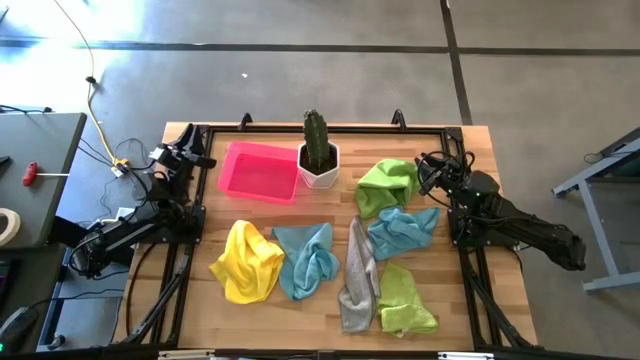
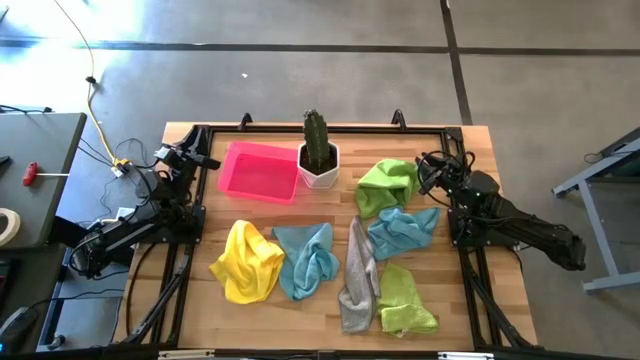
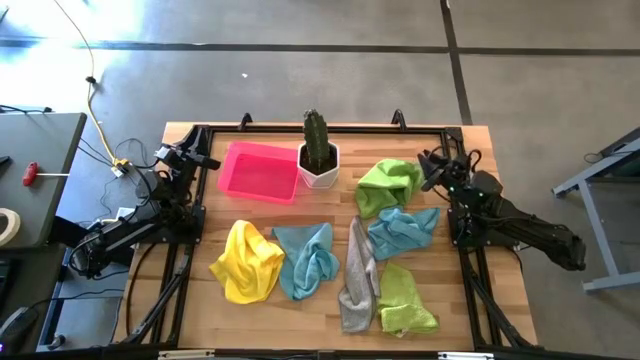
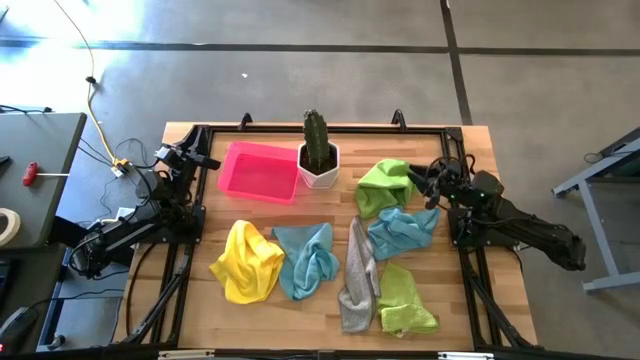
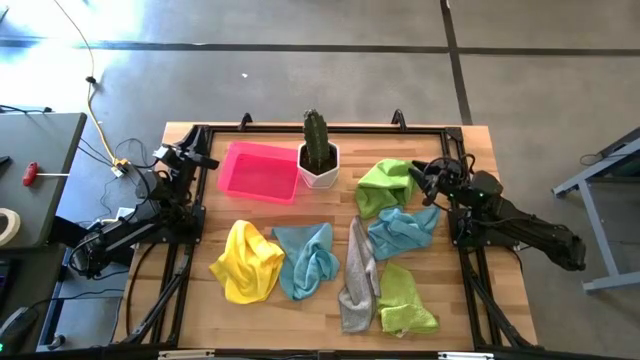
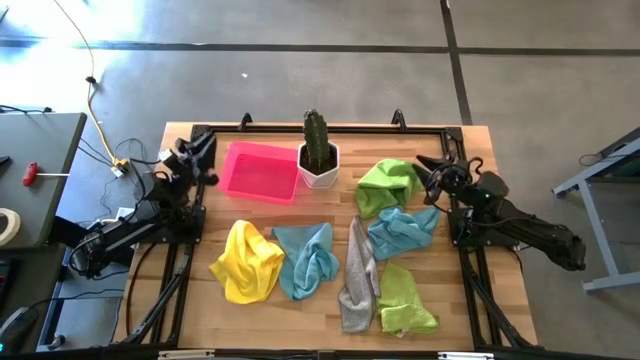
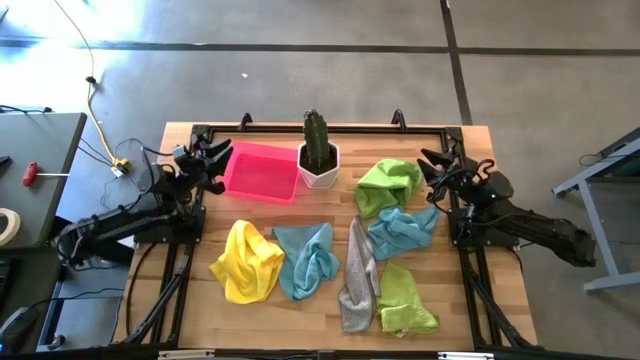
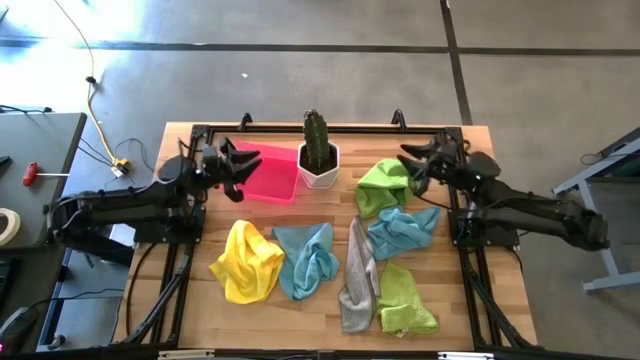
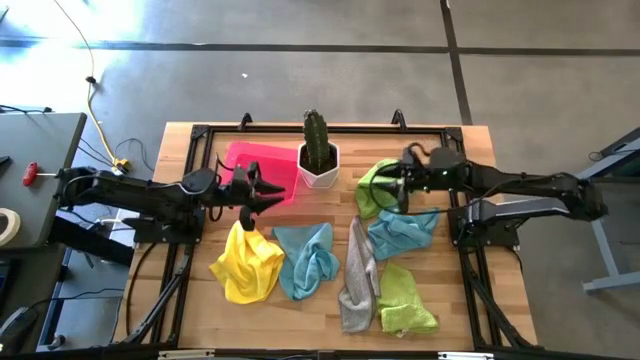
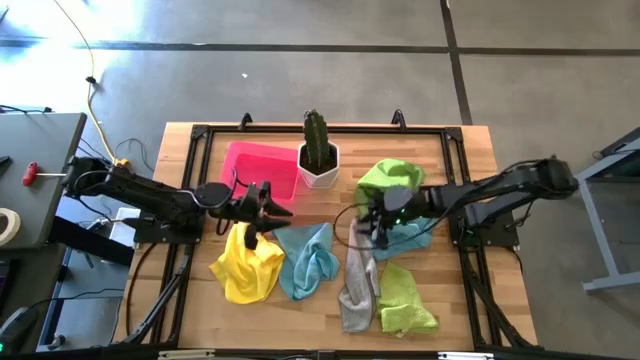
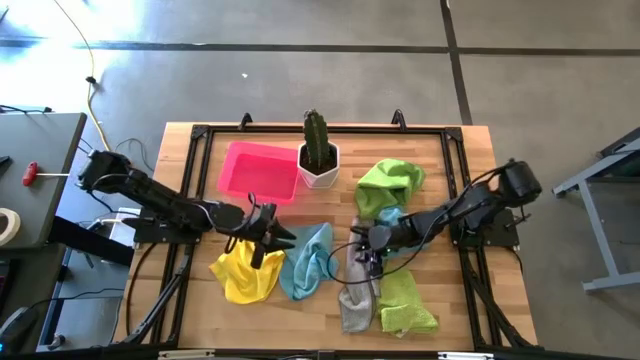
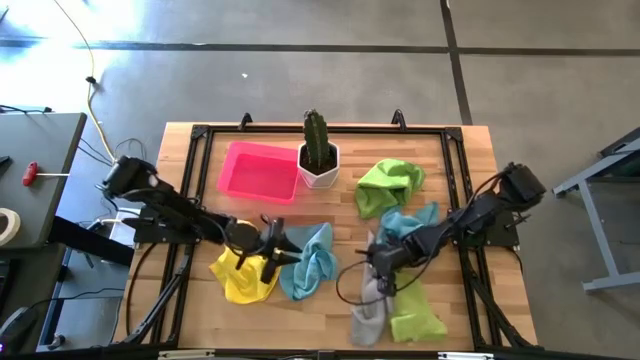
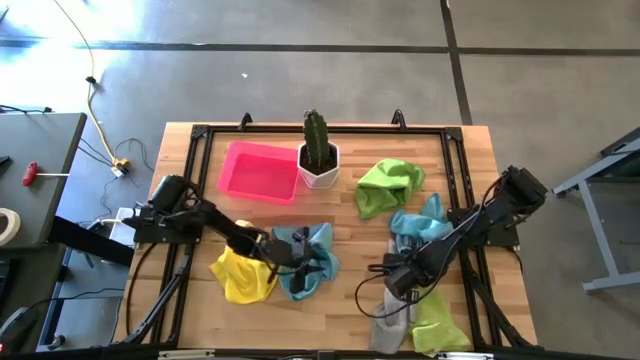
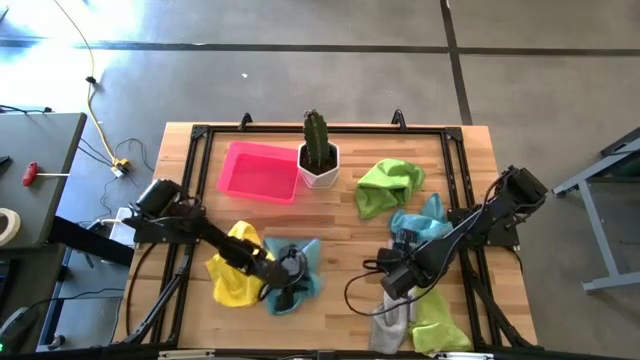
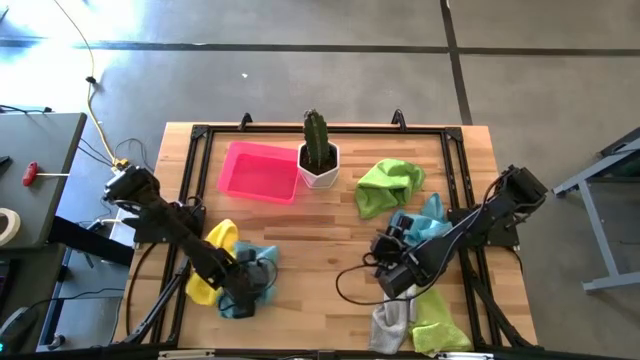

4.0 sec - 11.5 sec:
Task: Fold microfiber towels
Adjust the microfiber towels

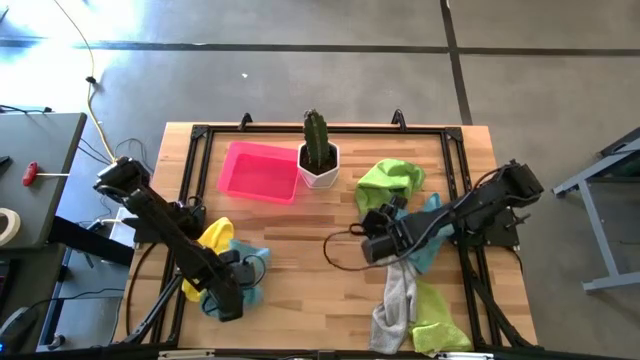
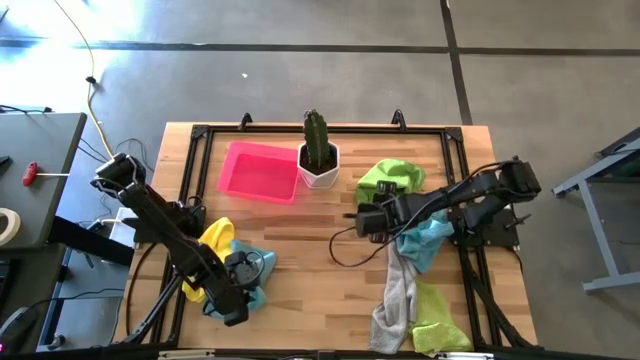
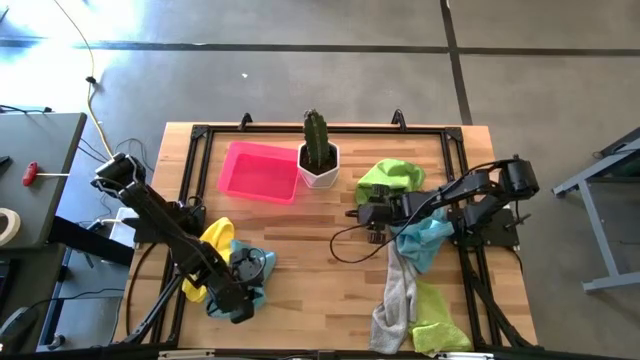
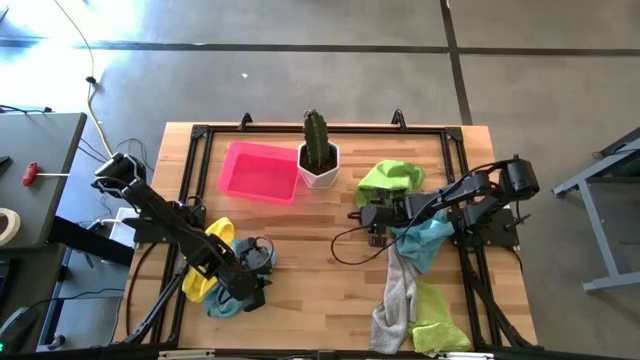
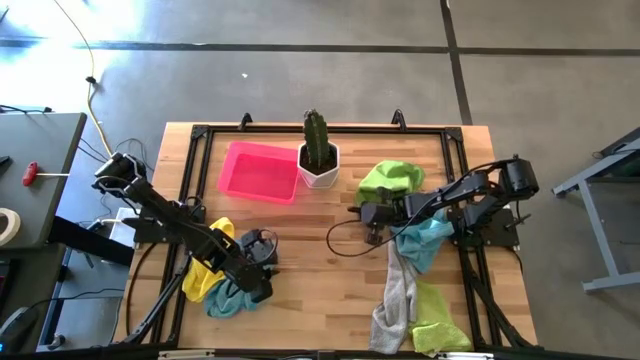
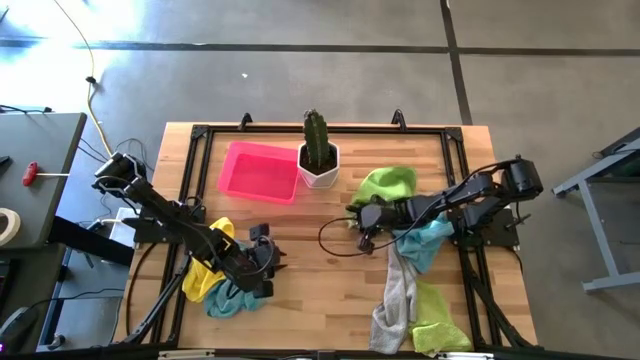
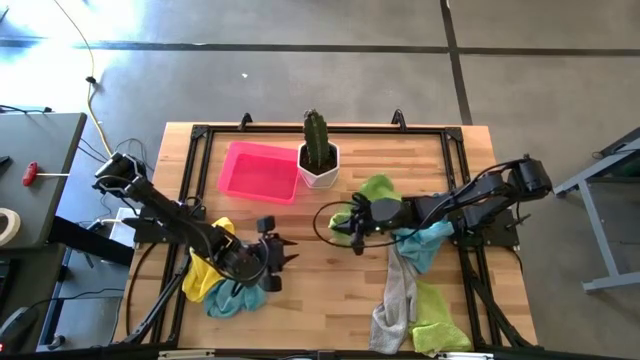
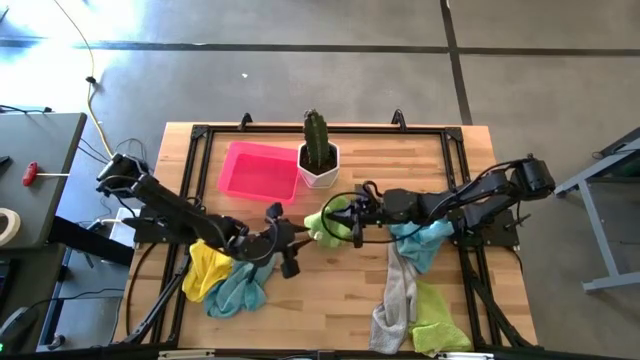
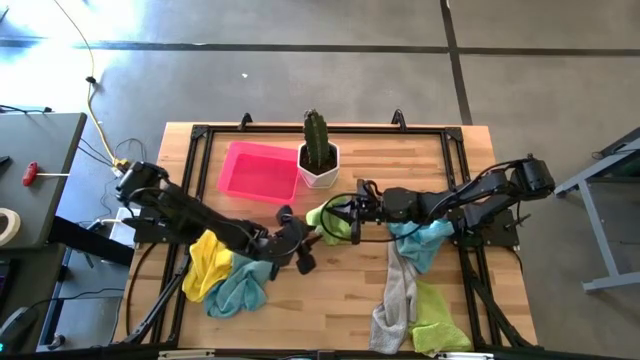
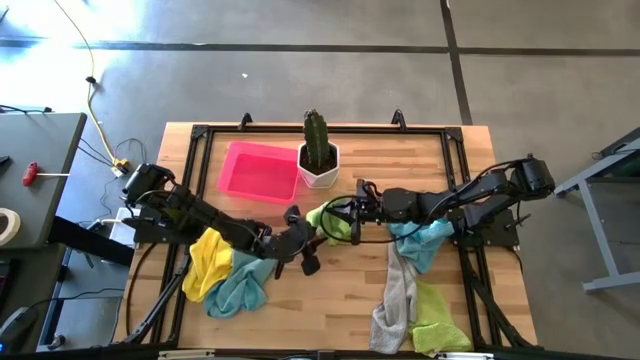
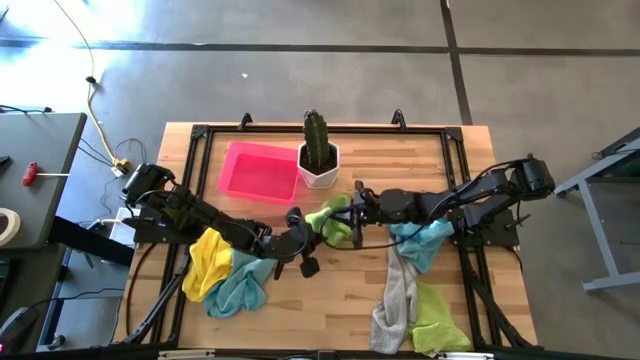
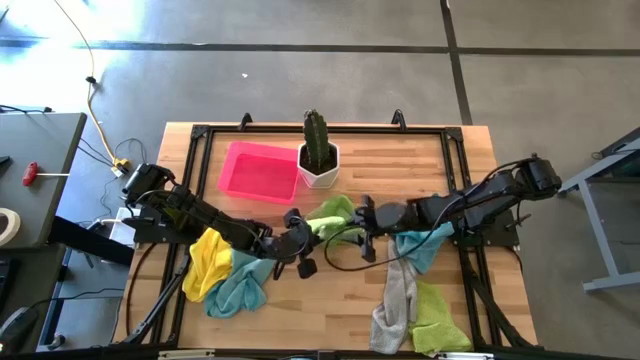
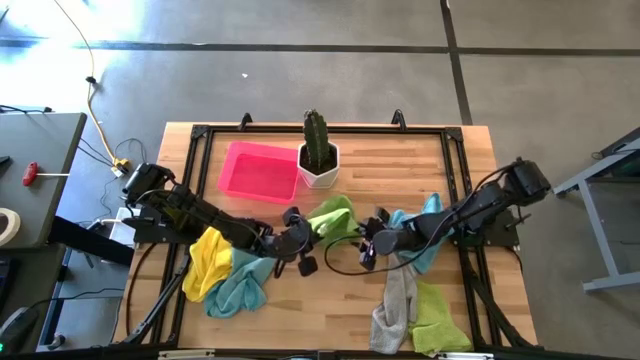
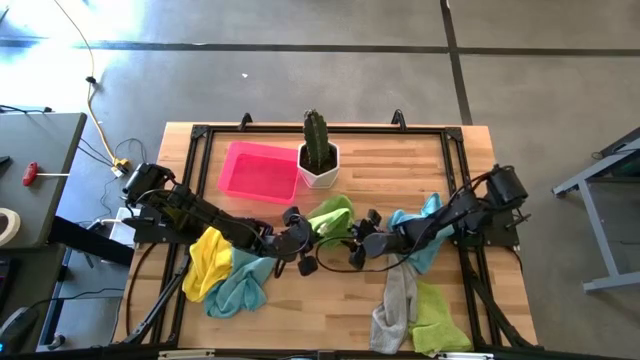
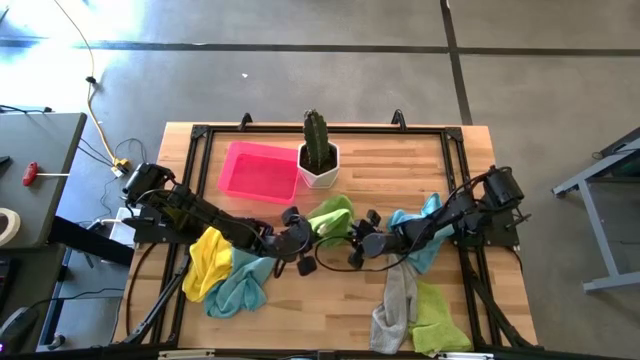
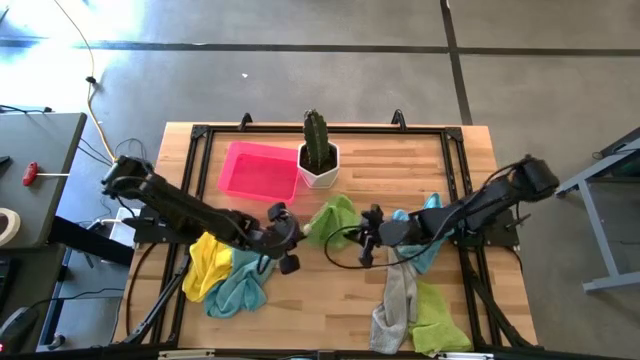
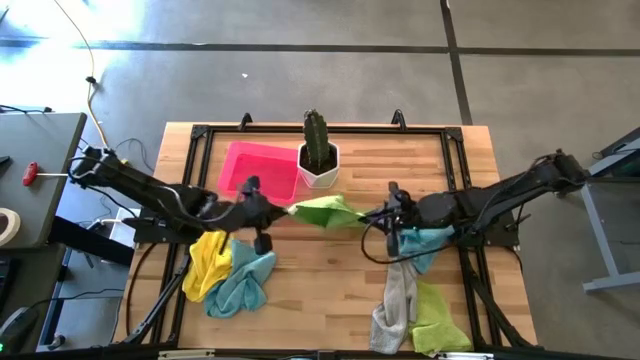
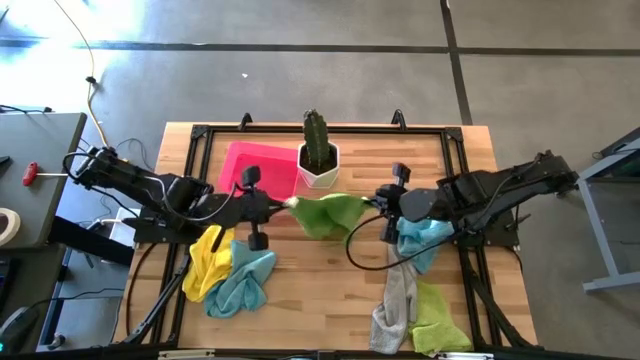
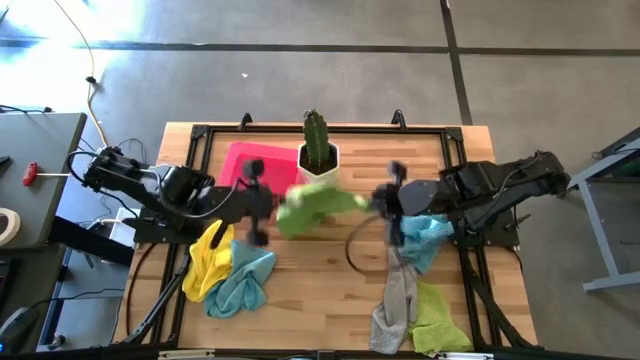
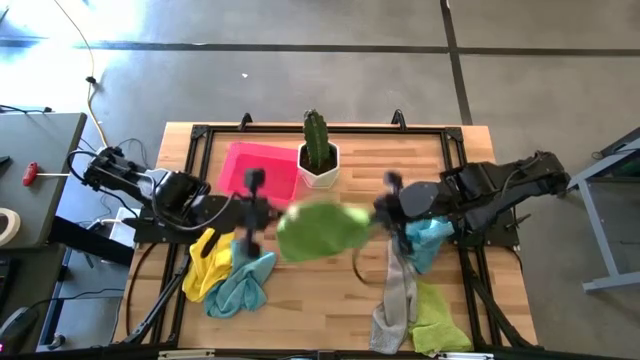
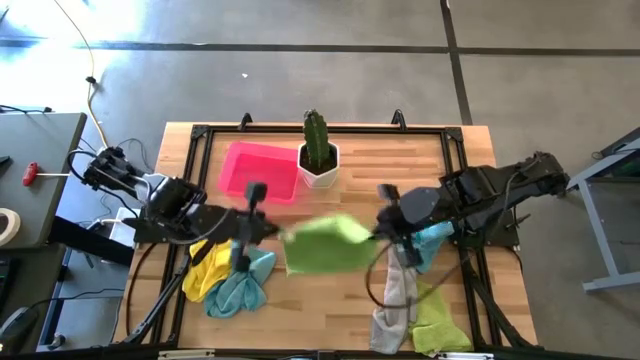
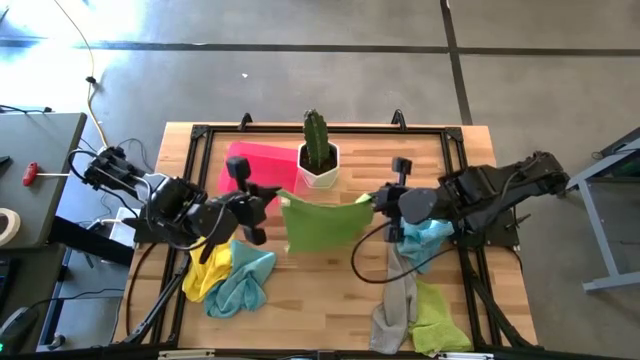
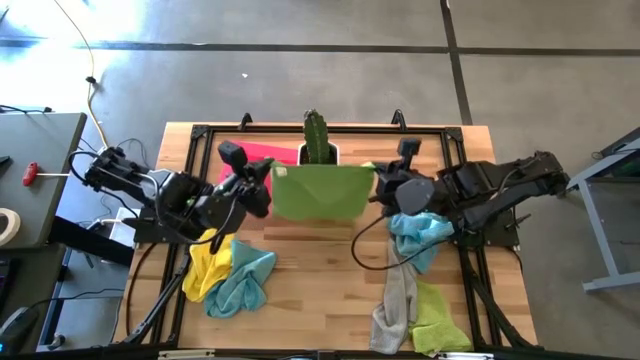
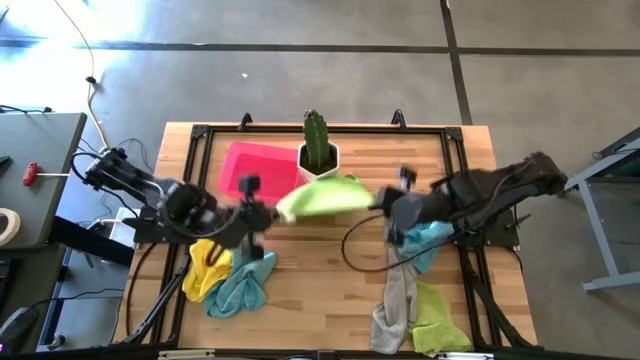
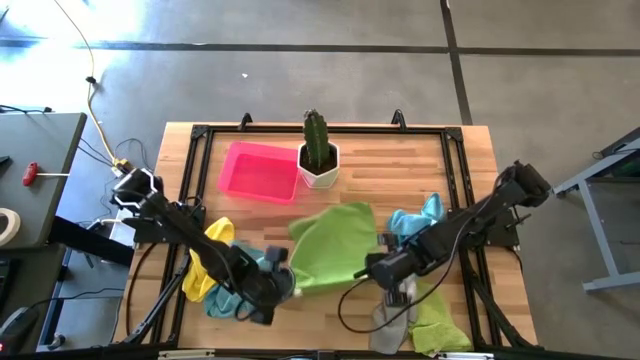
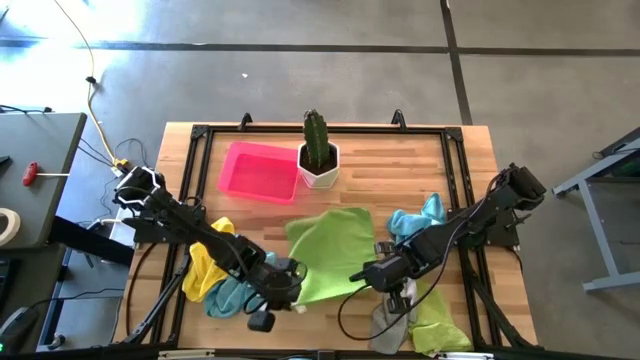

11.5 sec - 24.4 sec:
Fold the green microfiber towel
